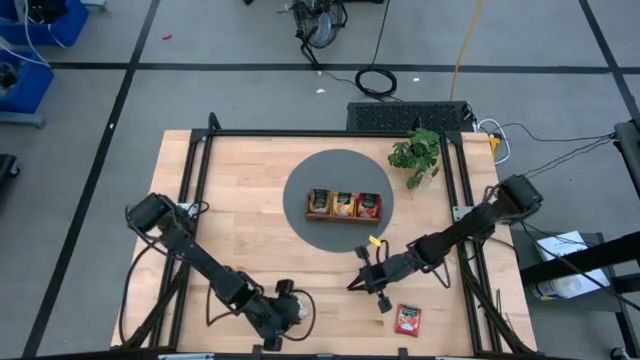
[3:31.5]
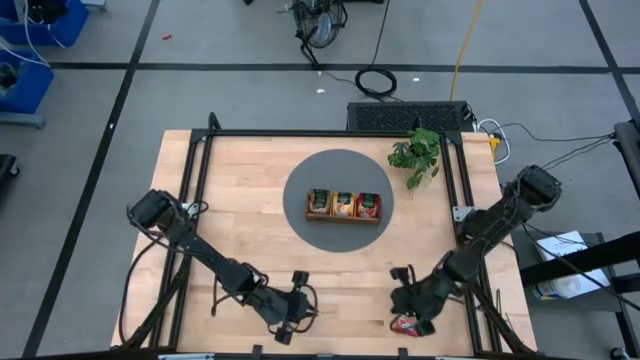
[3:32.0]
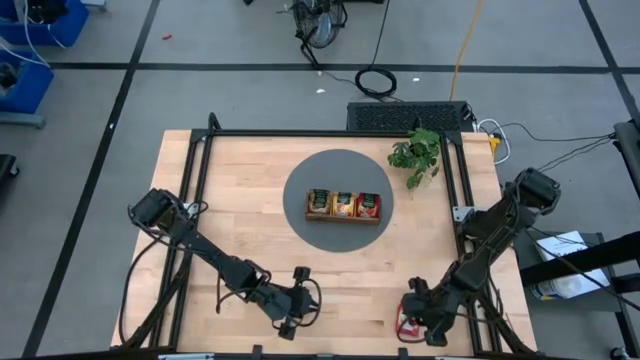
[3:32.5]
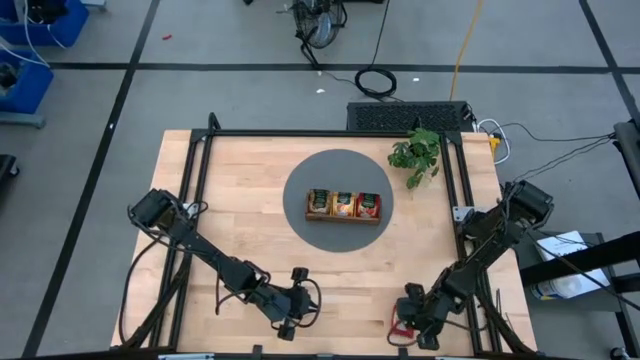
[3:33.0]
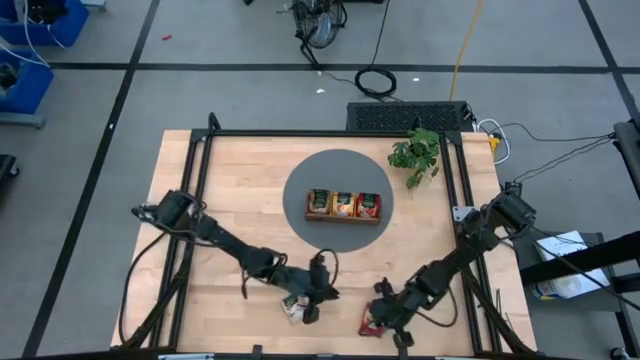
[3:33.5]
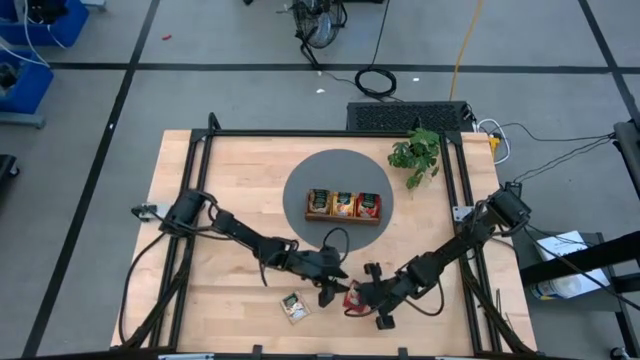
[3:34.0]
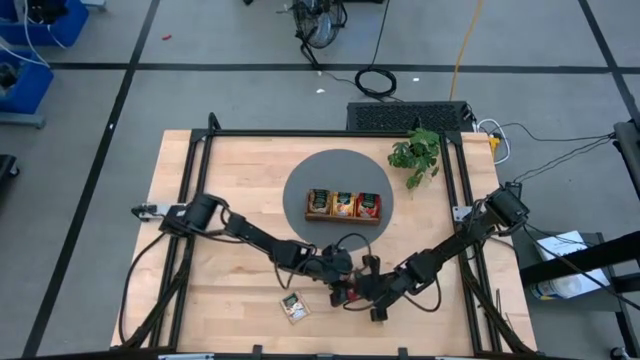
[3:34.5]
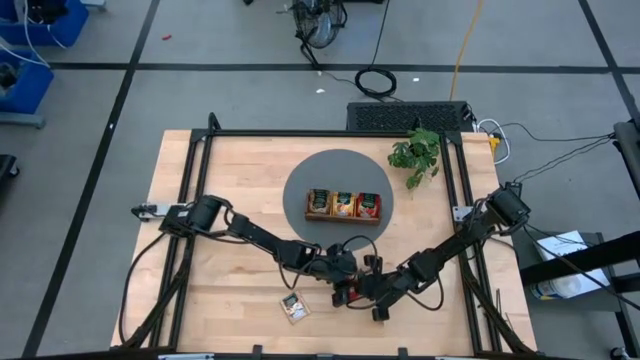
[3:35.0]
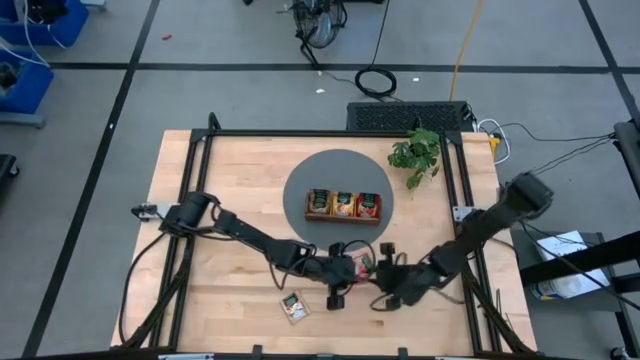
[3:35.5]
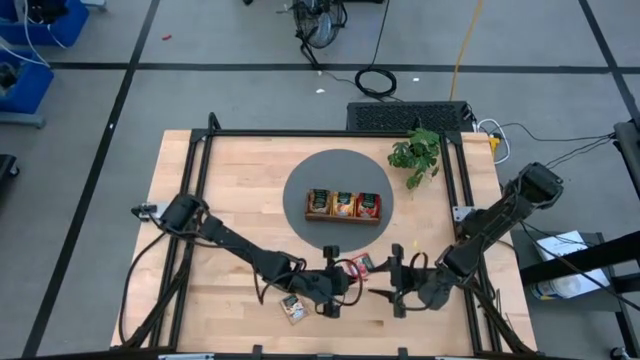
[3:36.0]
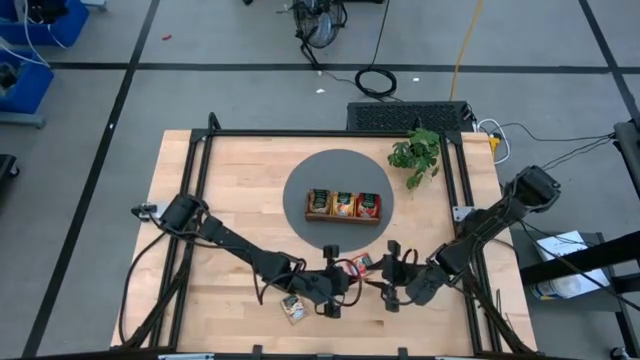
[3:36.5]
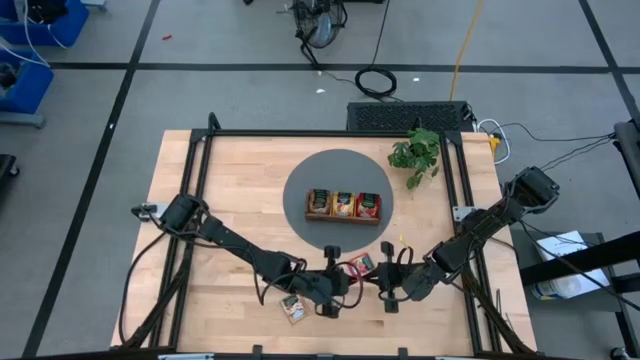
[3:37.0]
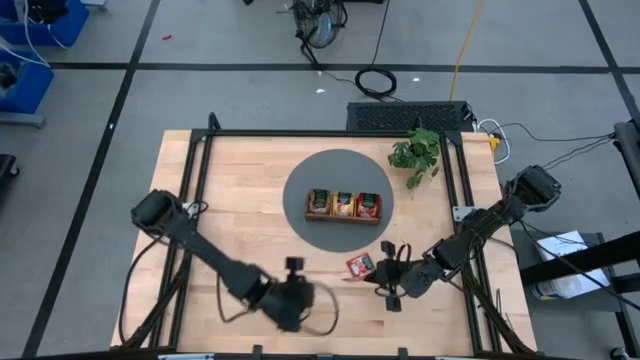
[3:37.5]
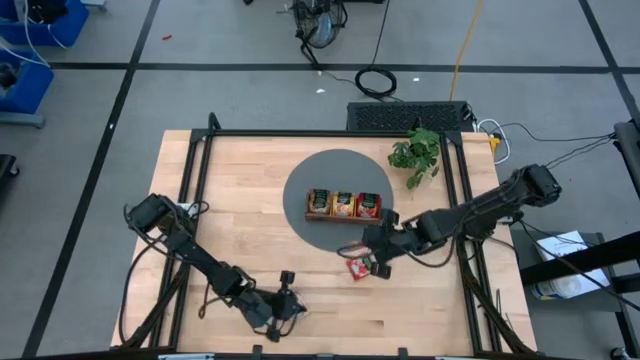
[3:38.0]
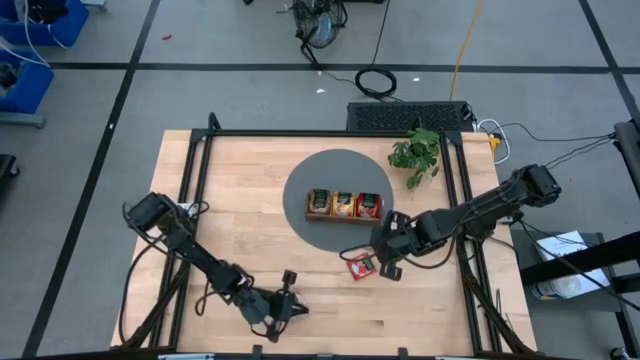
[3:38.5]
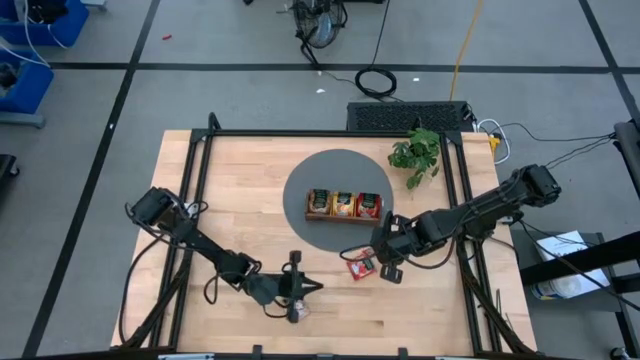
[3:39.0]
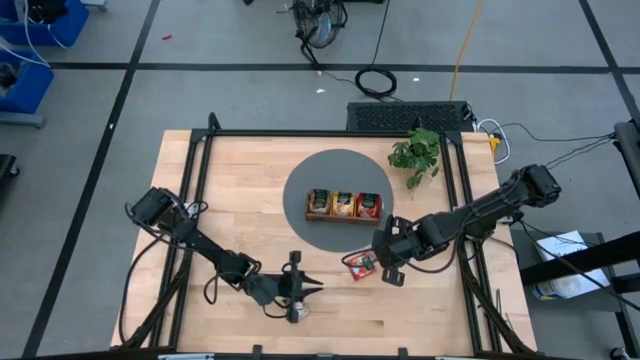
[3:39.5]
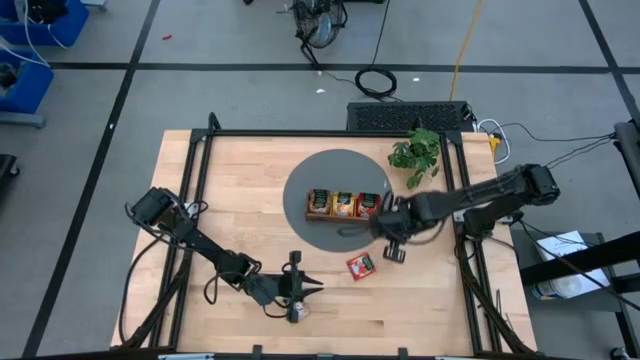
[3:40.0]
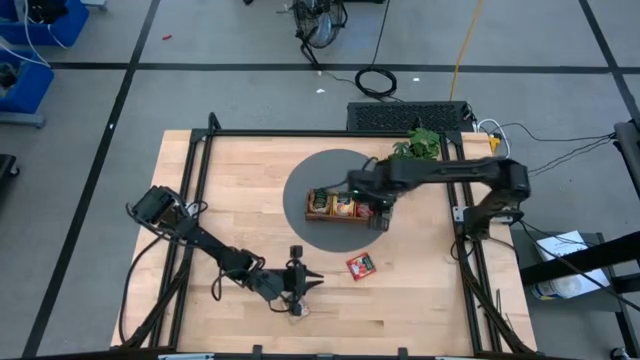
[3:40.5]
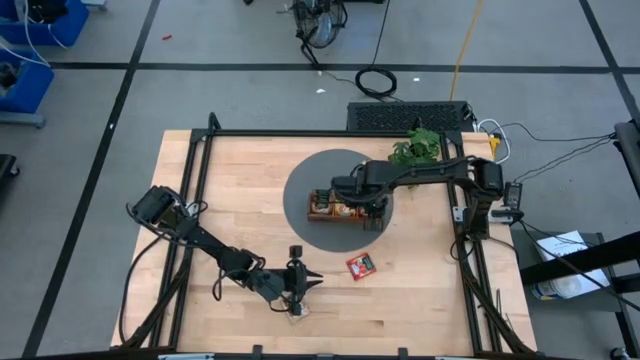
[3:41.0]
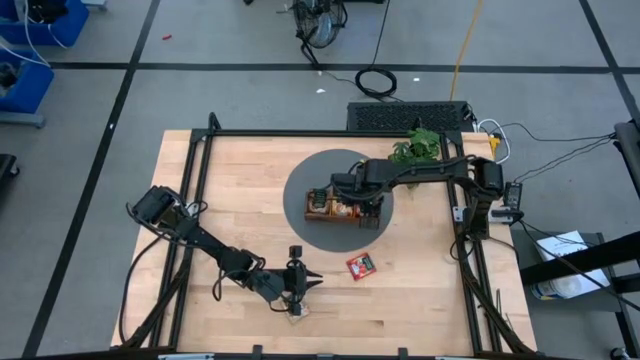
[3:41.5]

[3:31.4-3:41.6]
Task: Pick & Place Tea
Put the top red tea bag into the right slot of the wooden organizer

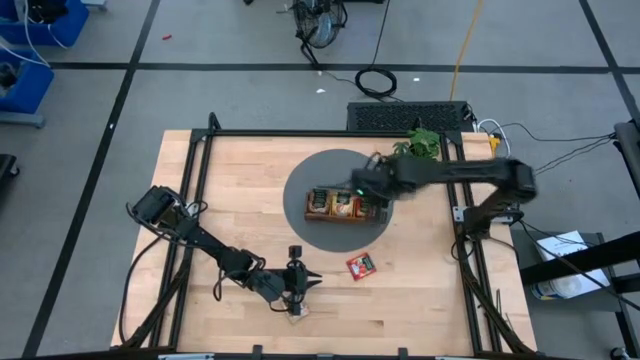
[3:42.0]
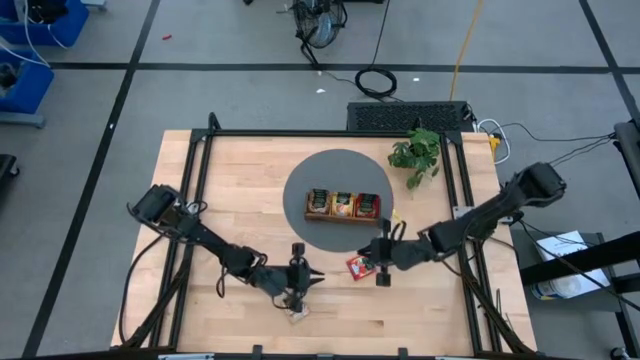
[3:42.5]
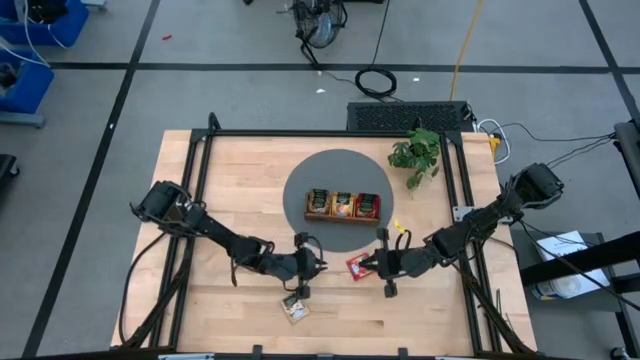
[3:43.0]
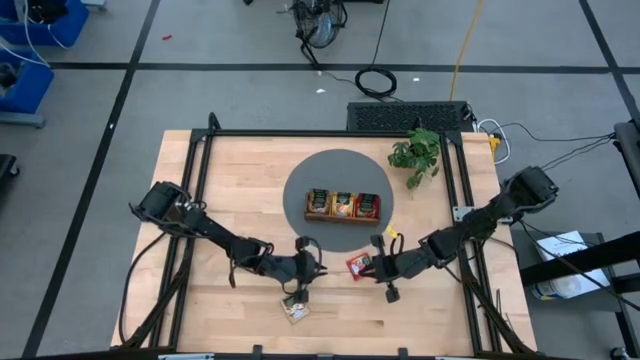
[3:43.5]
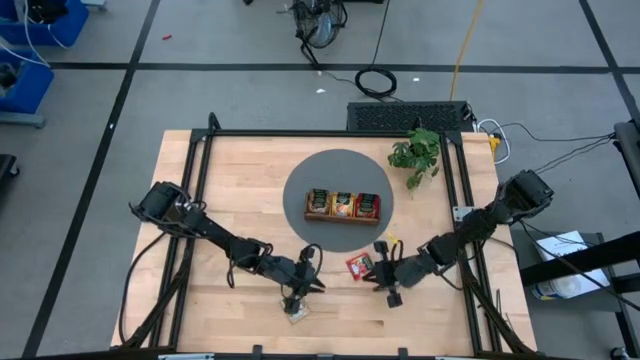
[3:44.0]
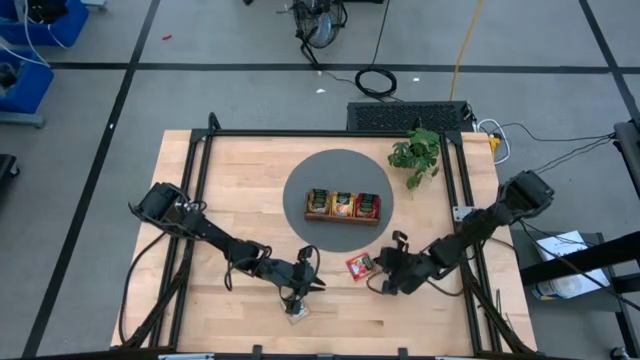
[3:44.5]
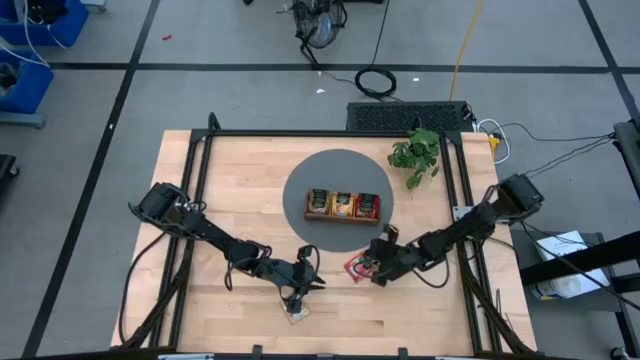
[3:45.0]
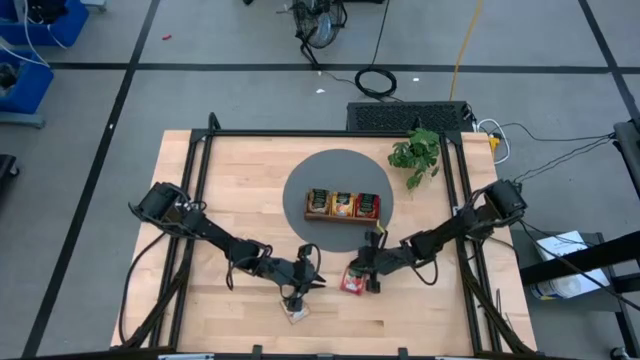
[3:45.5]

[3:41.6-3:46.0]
Adjust the red tea bag on the table

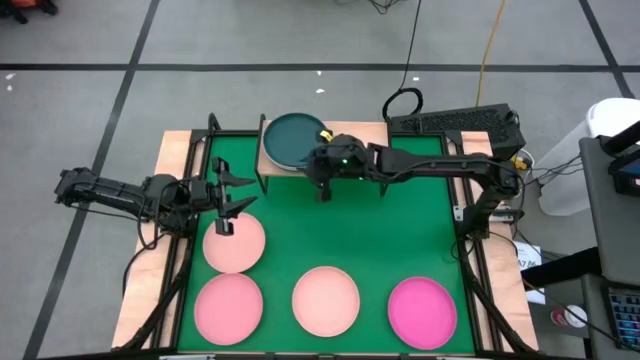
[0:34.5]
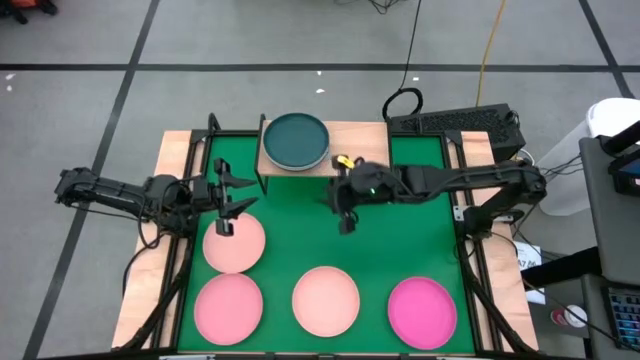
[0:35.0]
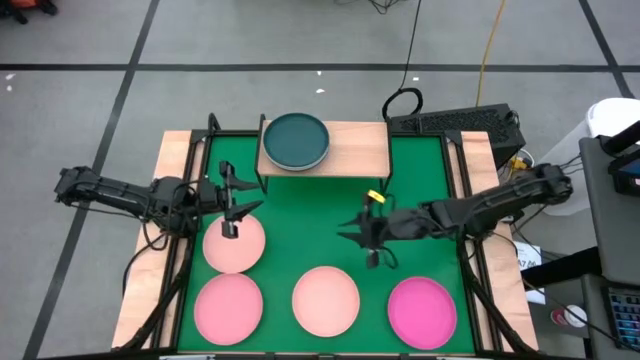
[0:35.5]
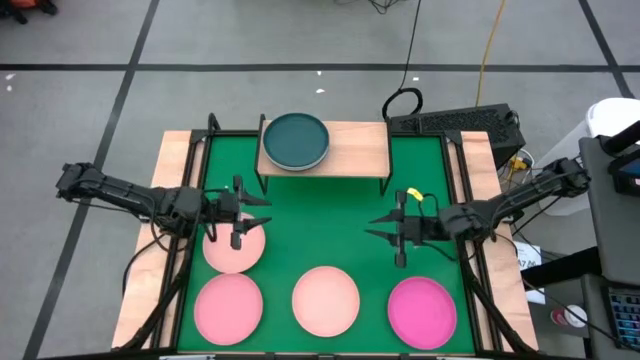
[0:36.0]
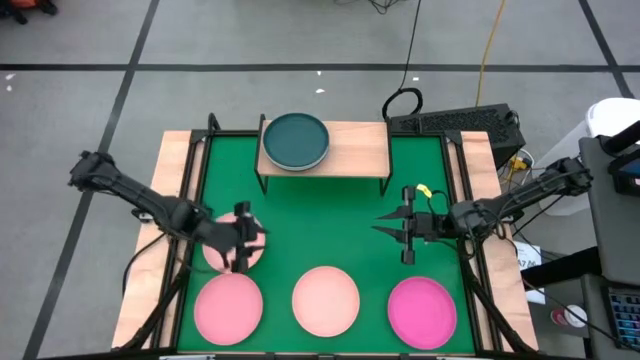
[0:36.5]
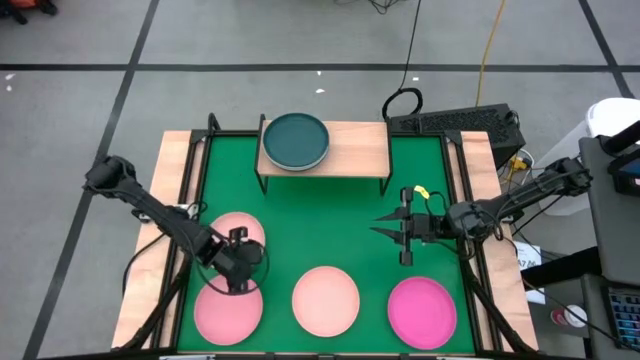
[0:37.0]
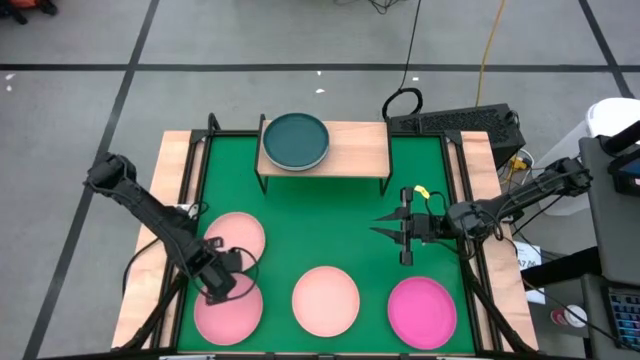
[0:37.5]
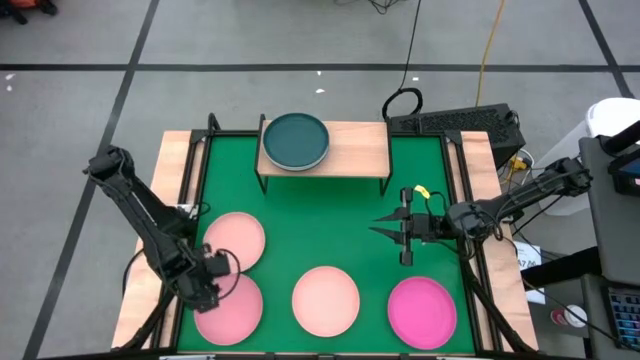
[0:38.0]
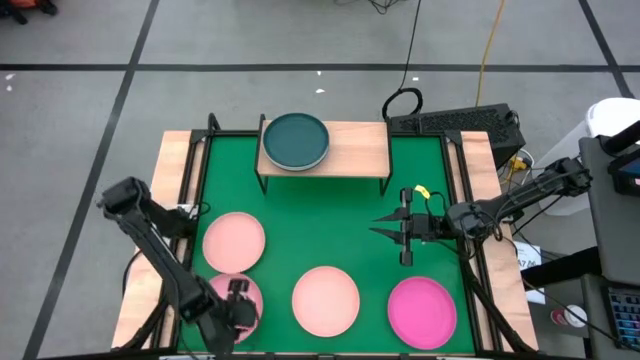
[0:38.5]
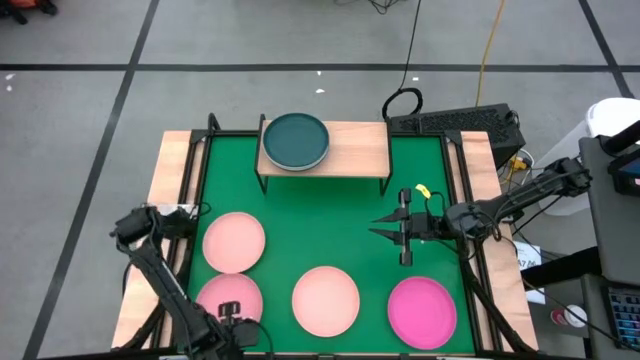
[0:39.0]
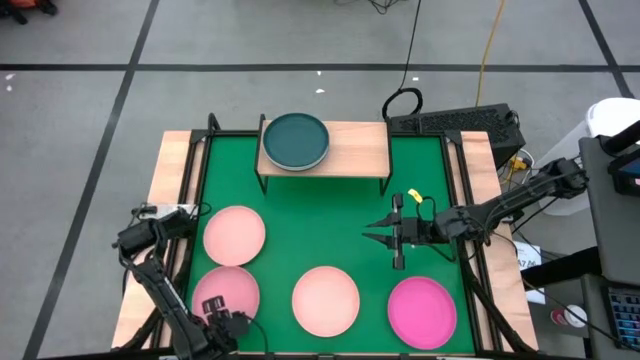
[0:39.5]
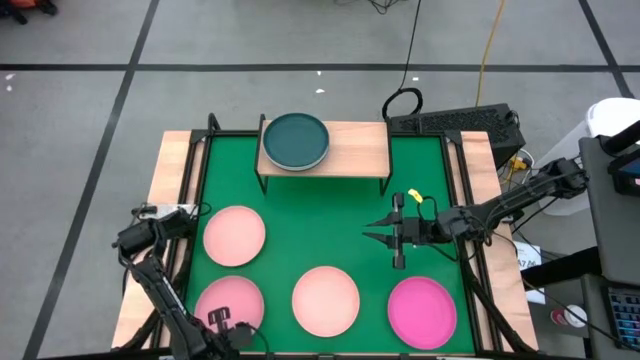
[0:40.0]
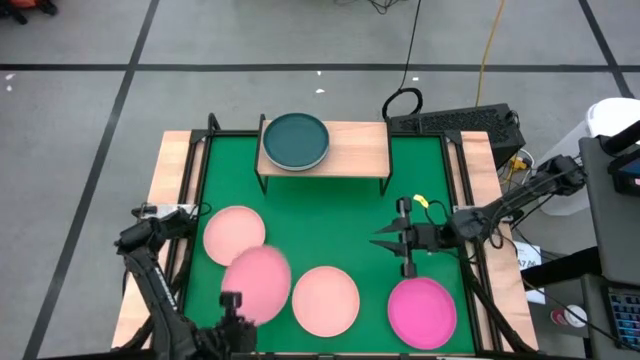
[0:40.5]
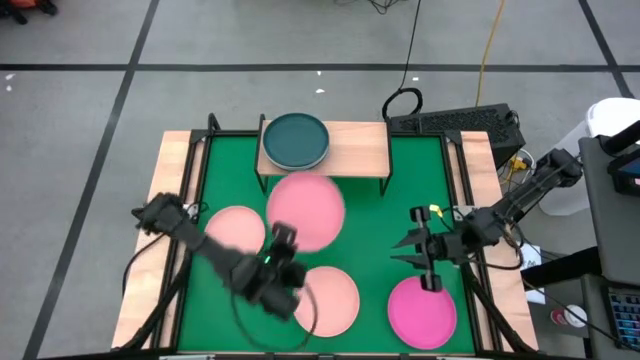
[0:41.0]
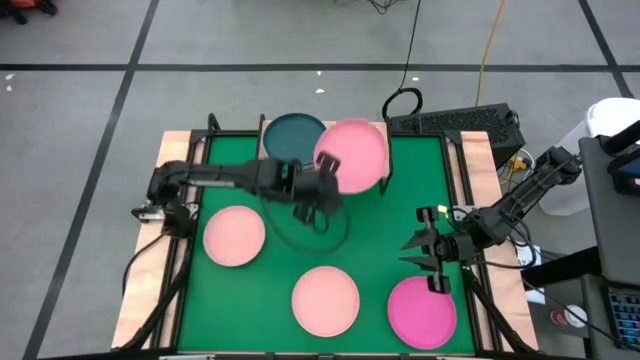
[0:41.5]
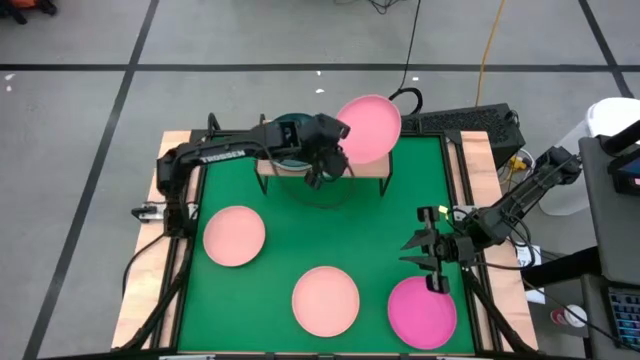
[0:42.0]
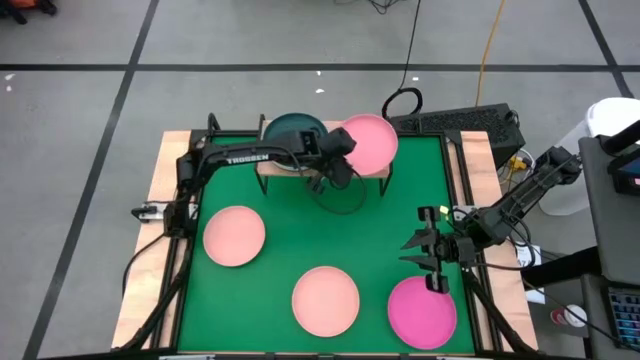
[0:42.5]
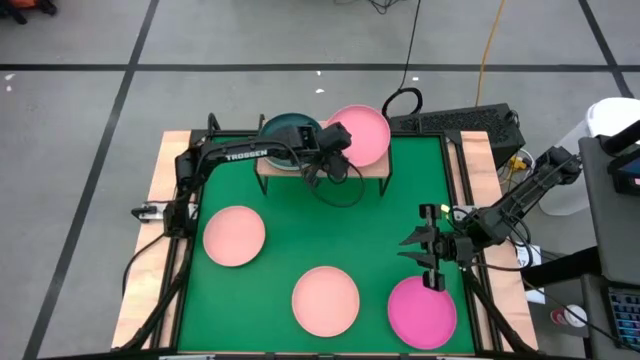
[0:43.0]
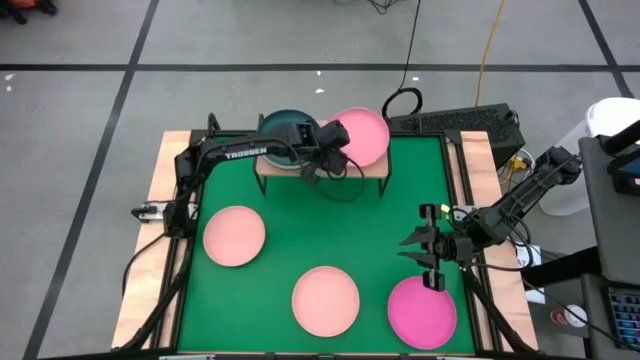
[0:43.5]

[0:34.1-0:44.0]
Task: Place and stack plates onto a shelf
Put the light pink plate on the shelf
